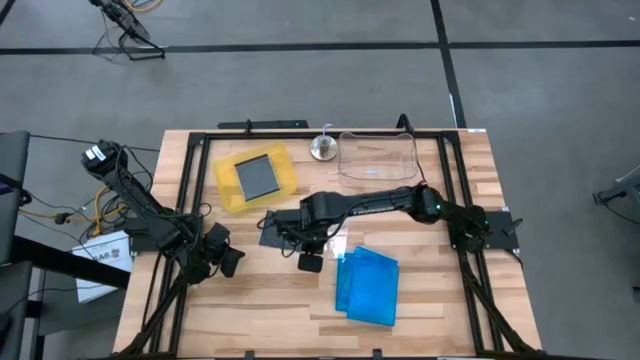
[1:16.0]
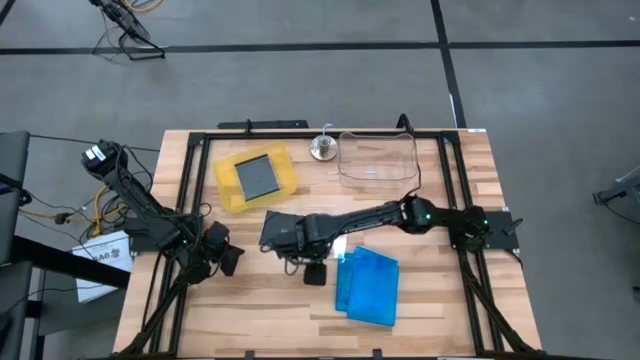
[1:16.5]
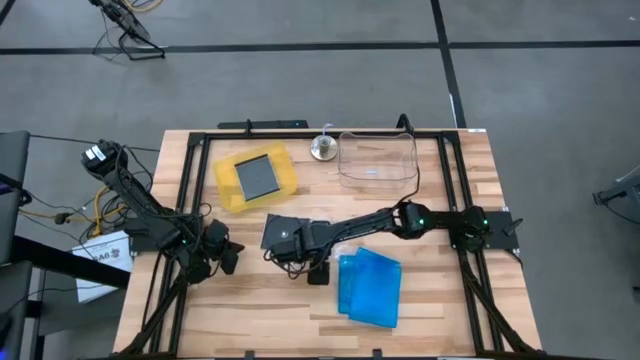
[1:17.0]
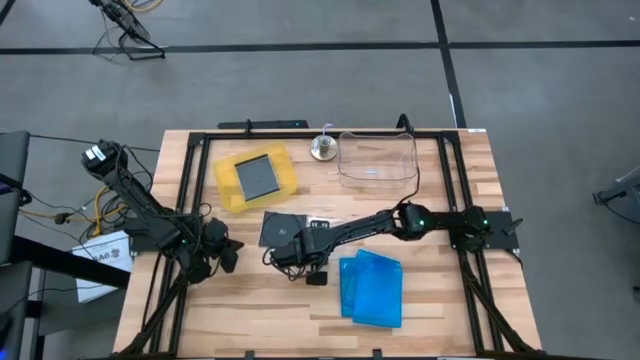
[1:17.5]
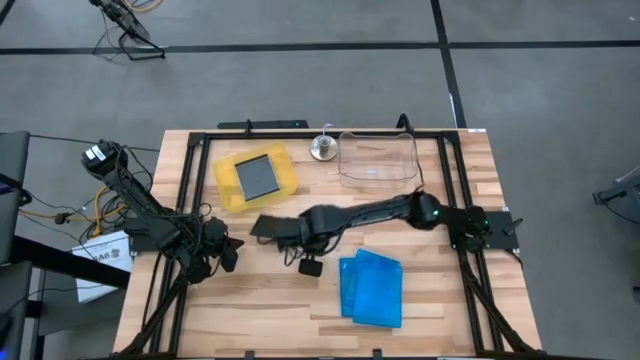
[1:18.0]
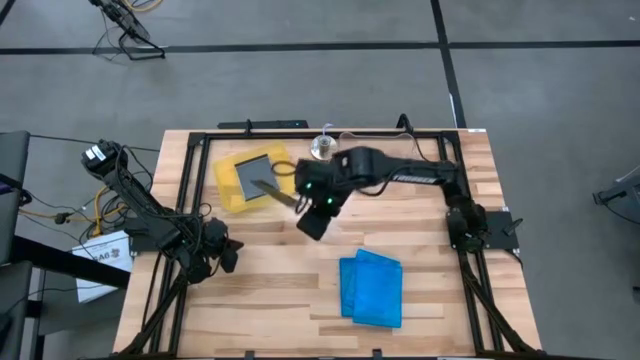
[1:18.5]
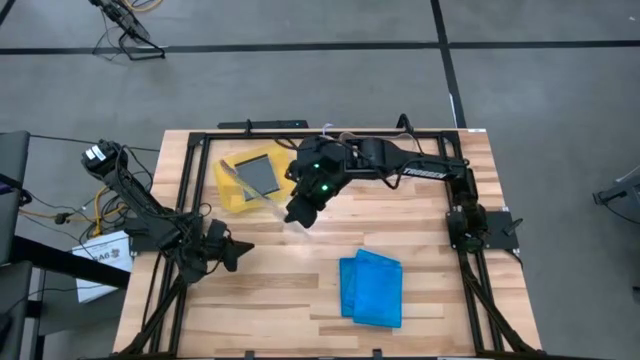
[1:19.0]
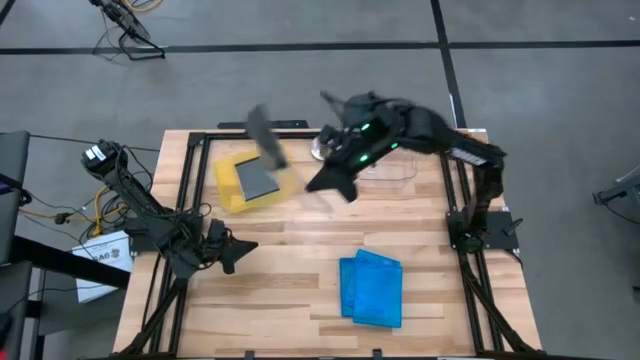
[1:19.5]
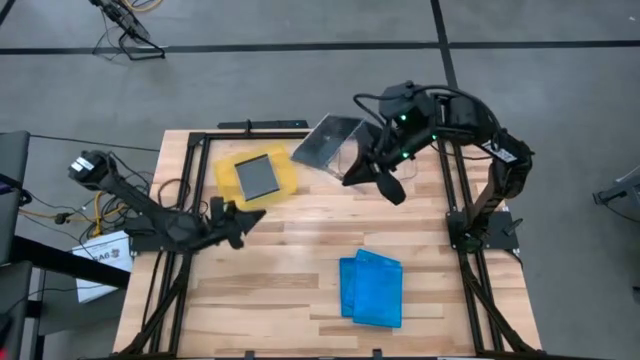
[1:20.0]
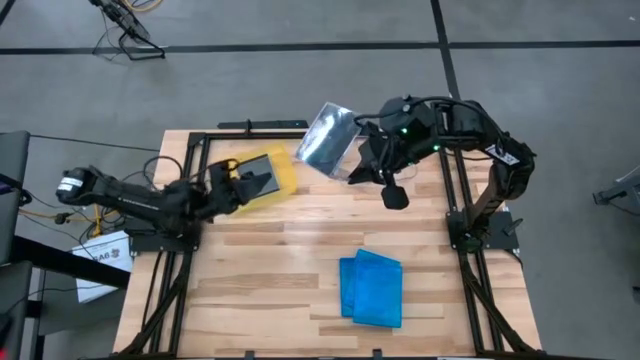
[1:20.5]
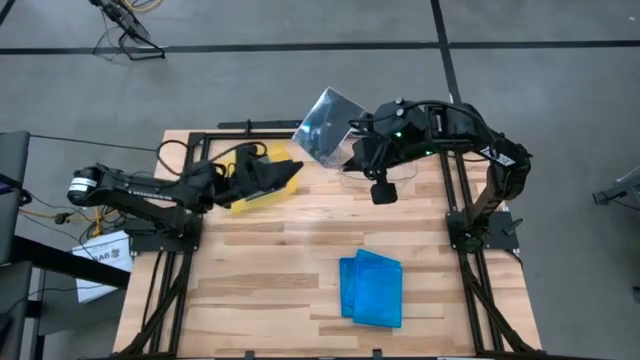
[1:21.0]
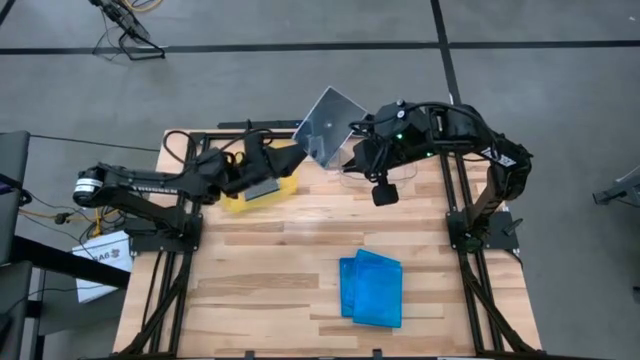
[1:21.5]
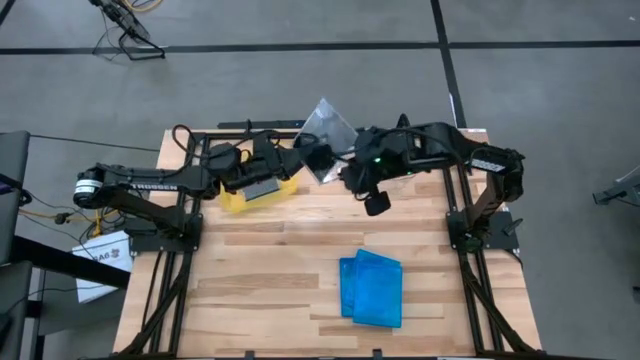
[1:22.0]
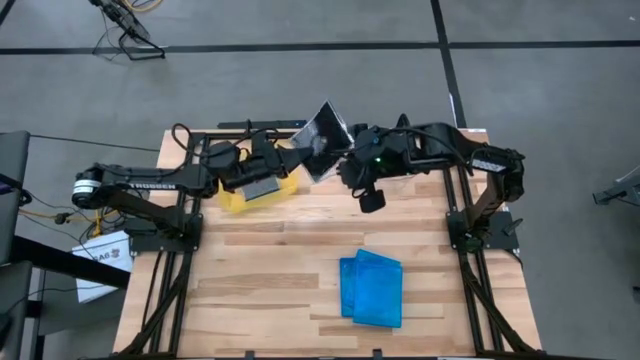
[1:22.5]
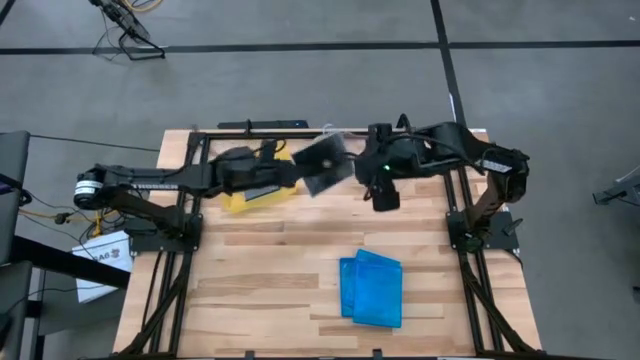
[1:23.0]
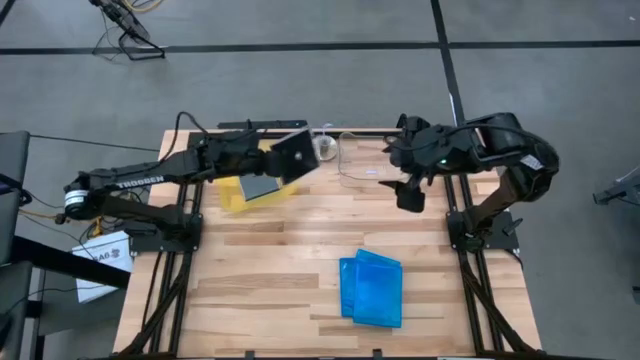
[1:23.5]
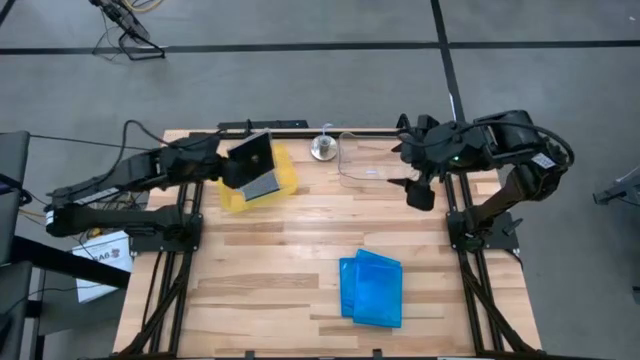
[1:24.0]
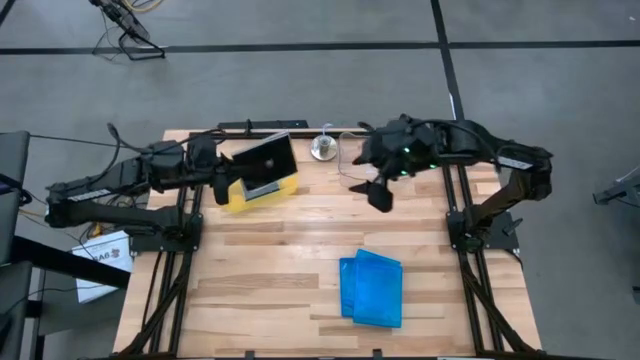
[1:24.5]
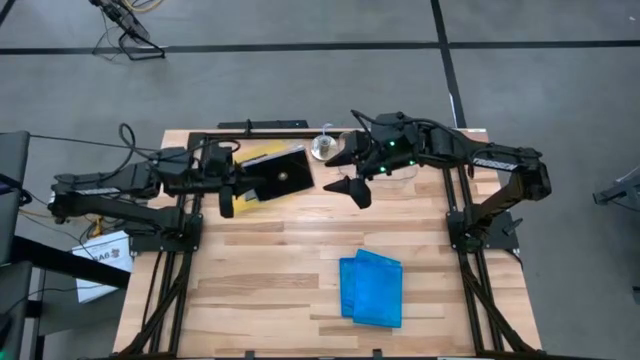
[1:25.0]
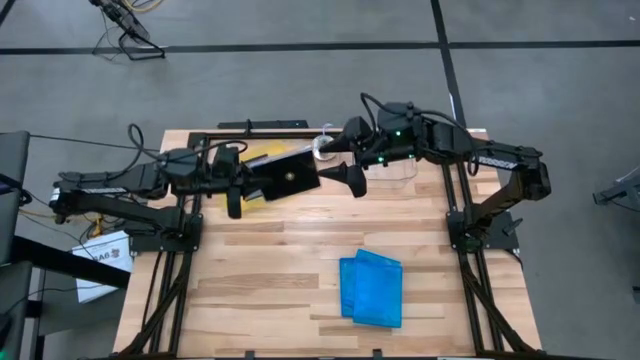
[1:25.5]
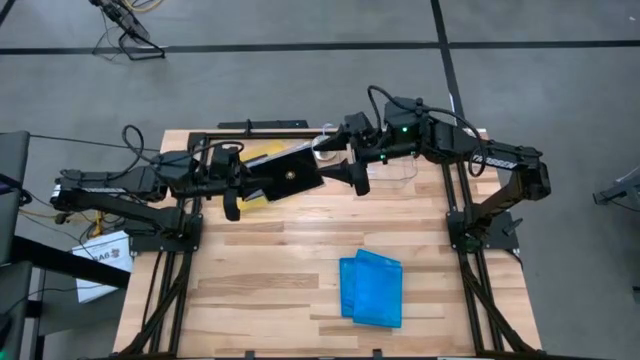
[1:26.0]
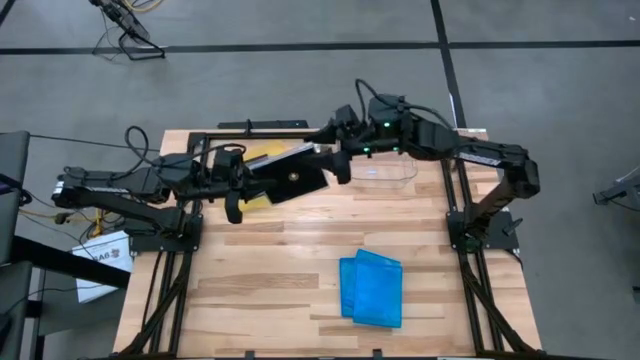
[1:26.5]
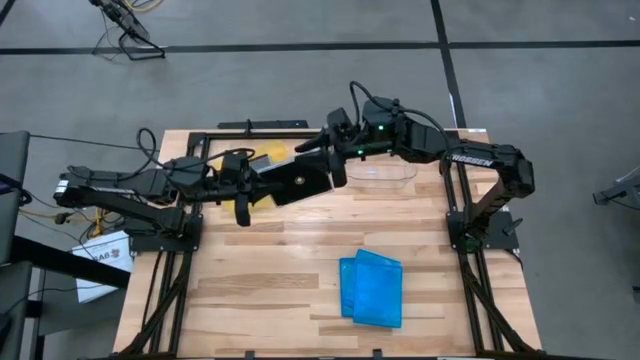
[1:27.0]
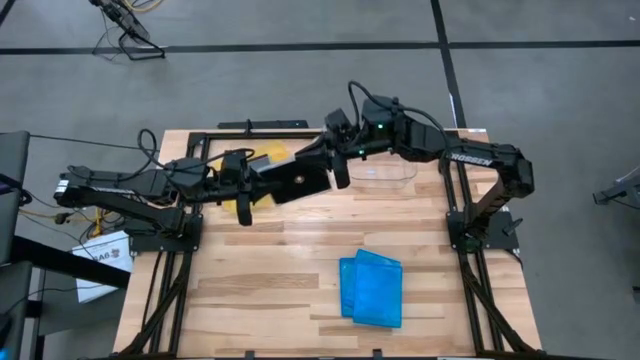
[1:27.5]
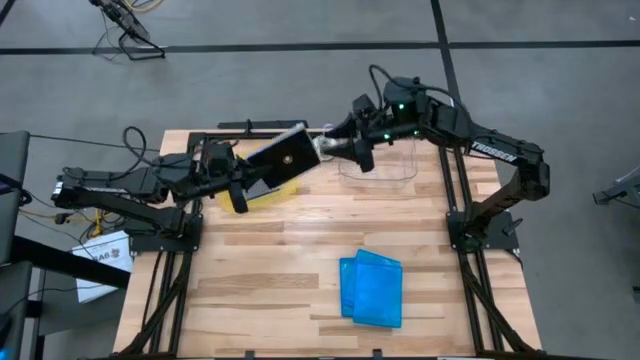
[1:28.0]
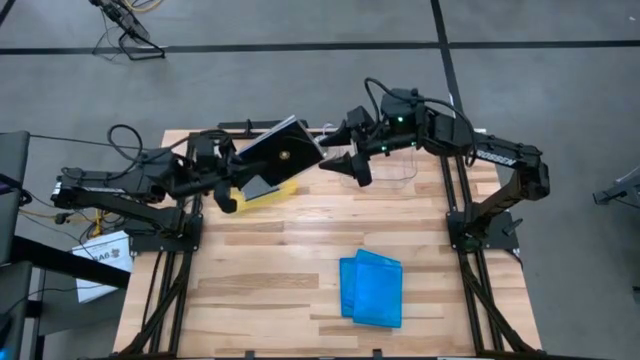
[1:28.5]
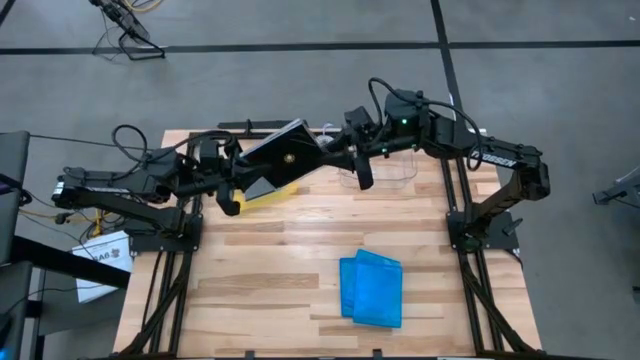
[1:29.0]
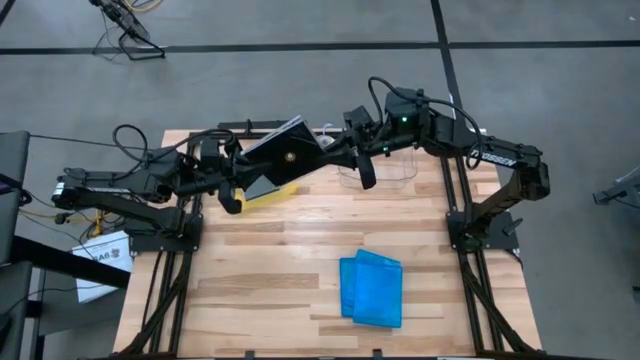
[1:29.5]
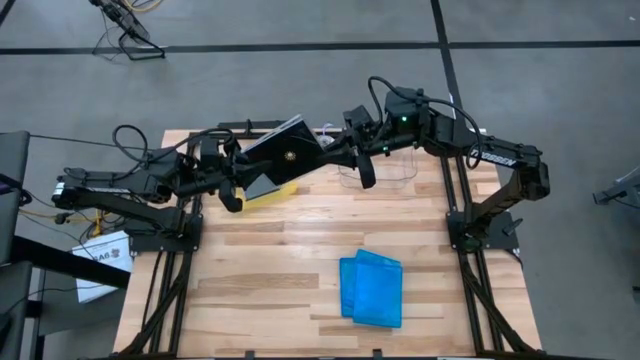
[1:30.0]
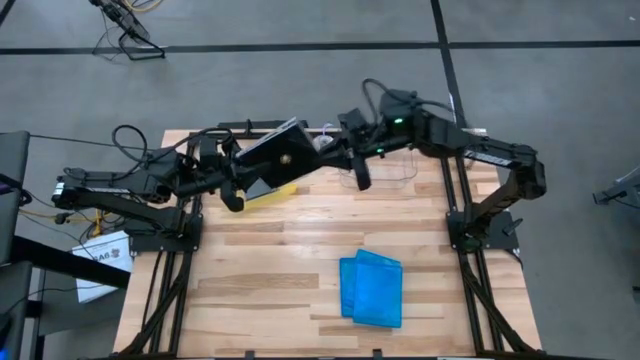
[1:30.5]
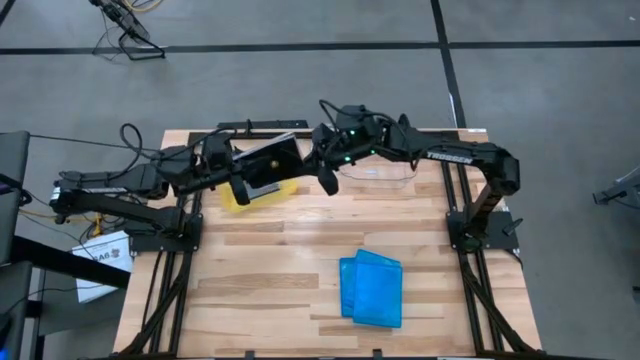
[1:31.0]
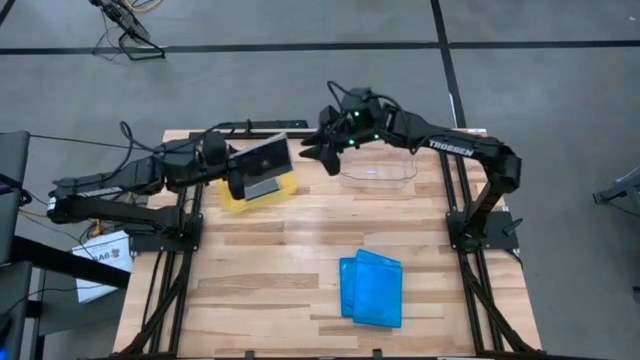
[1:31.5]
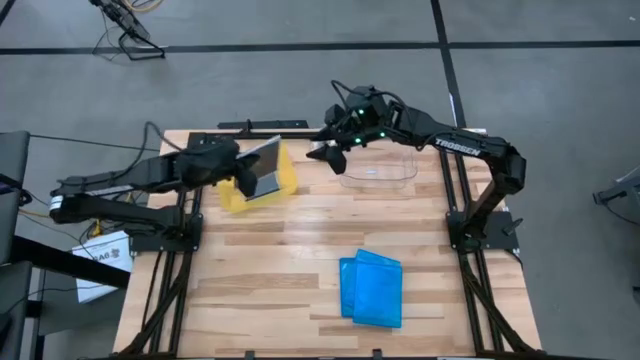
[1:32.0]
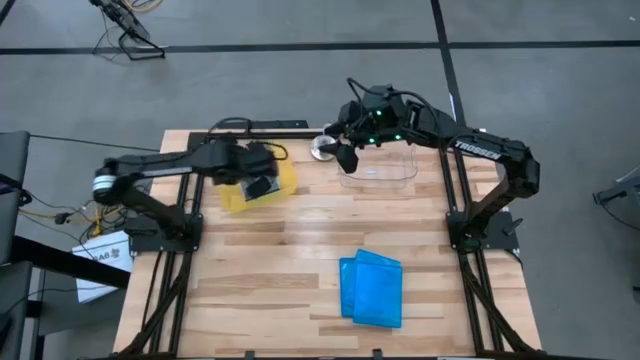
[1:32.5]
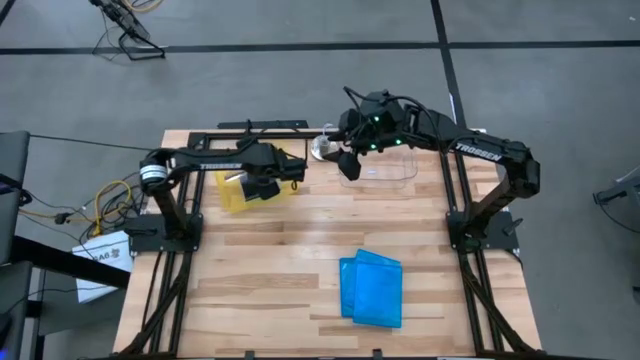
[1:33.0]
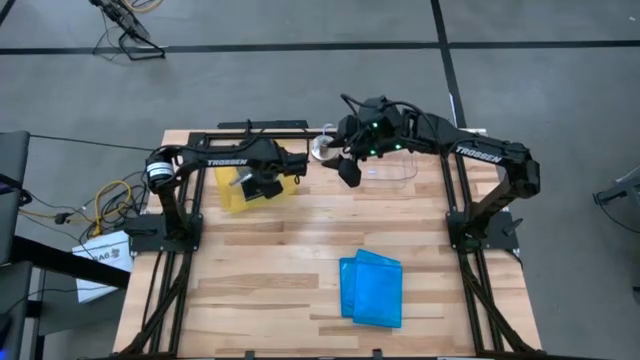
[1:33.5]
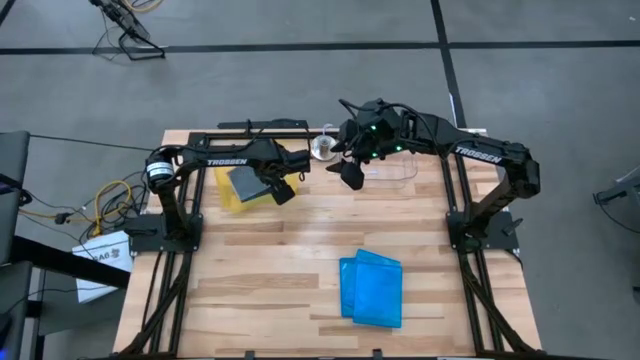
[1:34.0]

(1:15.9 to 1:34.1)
Task: Pick & place jewel cases by type
Put the black CD case into the yellow bin

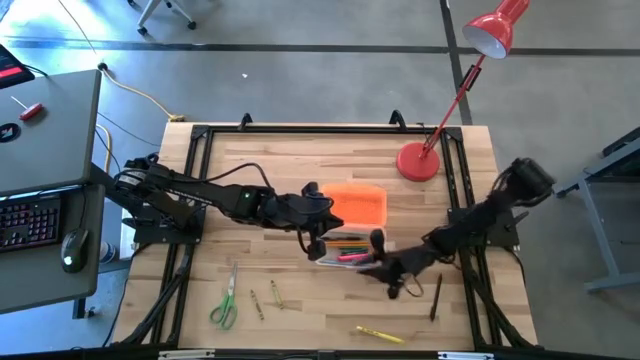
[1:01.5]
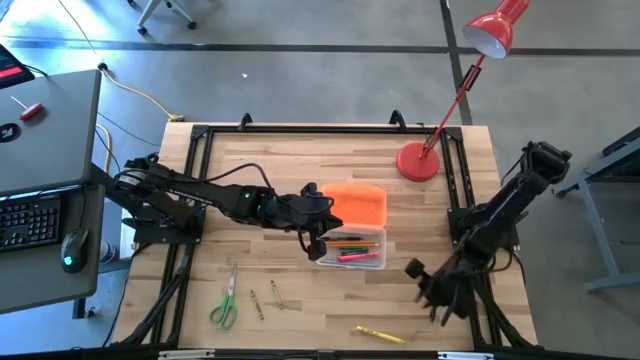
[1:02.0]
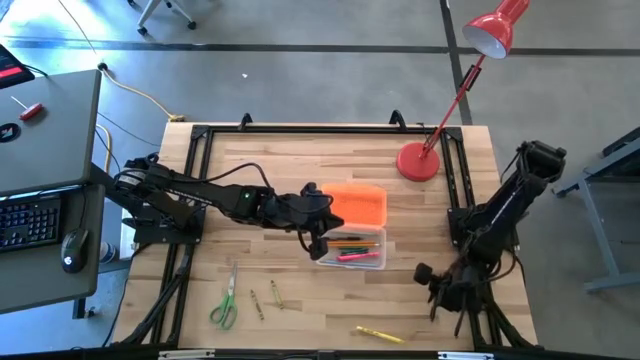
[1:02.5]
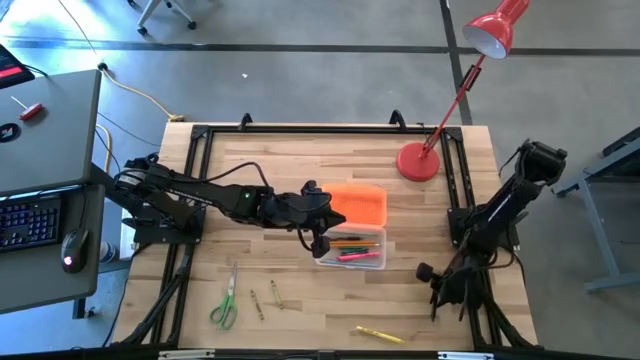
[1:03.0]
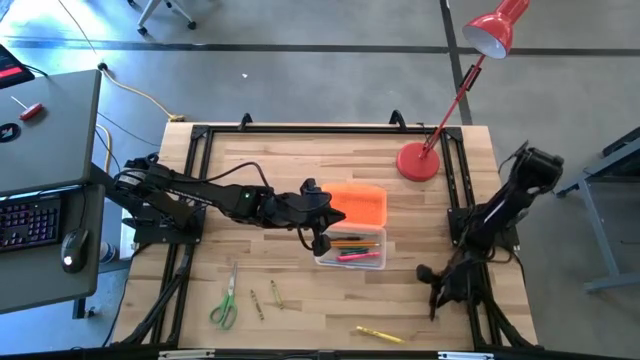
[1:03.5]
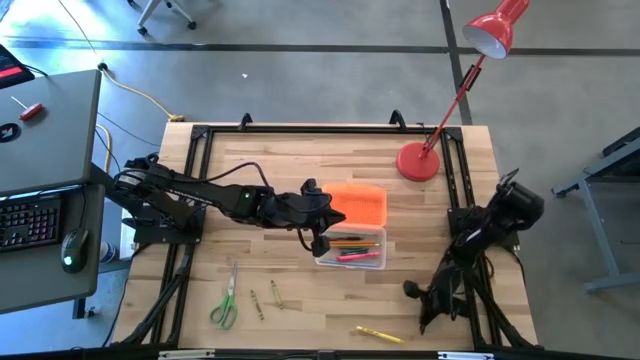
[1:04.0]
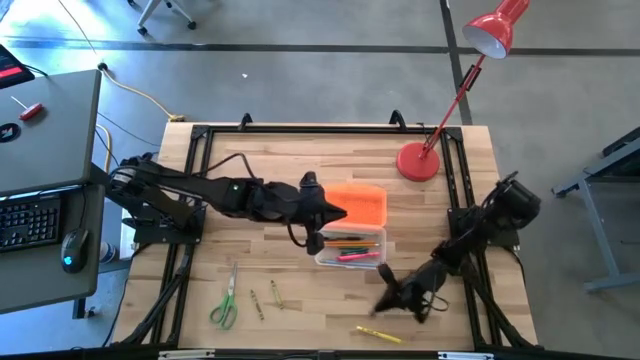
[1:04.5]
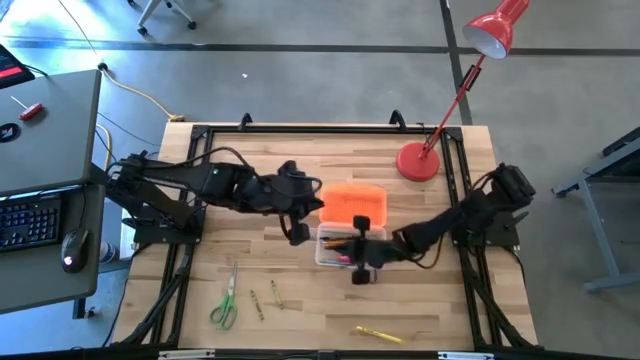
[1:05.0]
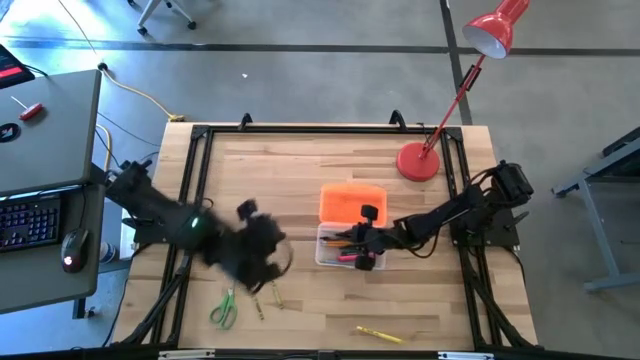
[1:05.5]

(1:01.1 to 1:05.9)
Task: Pick & place school supplies into a supply box
Put the black pen into the supply box
